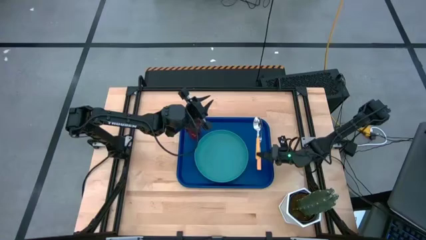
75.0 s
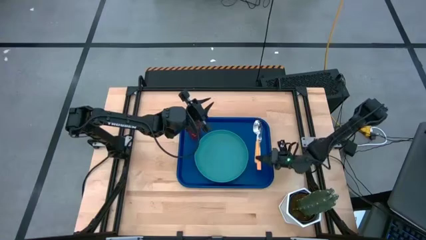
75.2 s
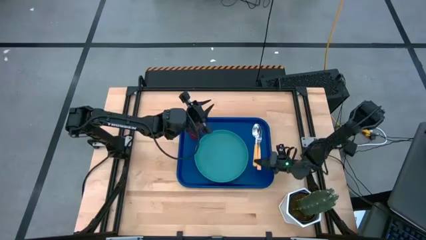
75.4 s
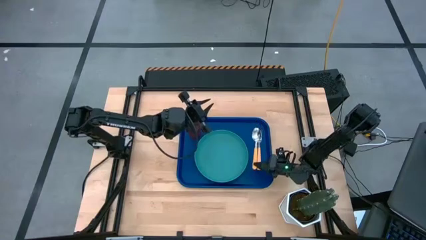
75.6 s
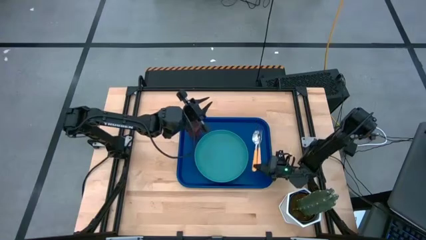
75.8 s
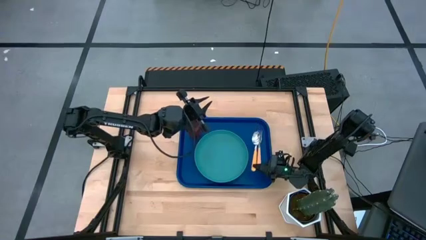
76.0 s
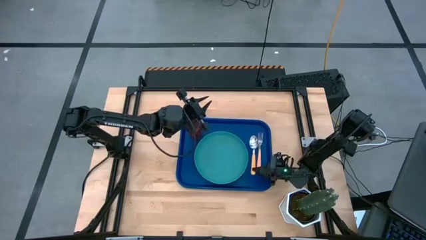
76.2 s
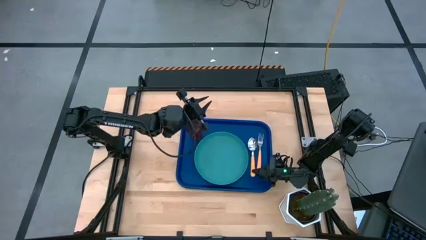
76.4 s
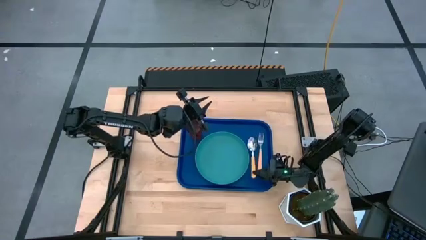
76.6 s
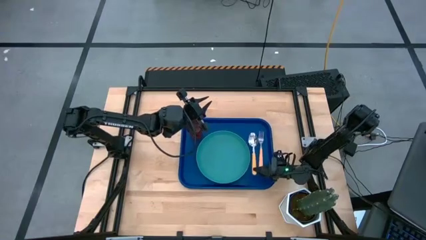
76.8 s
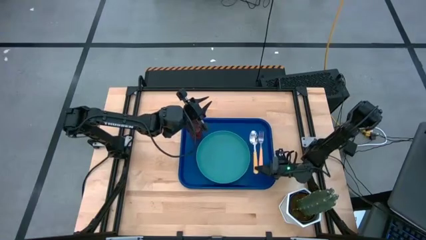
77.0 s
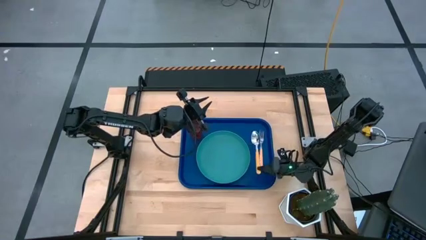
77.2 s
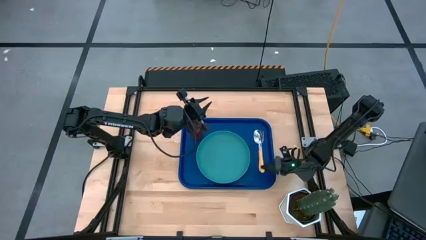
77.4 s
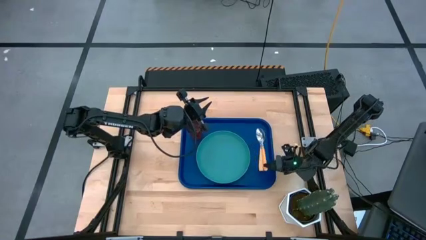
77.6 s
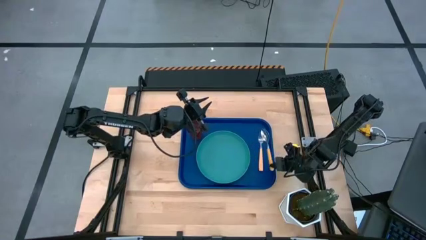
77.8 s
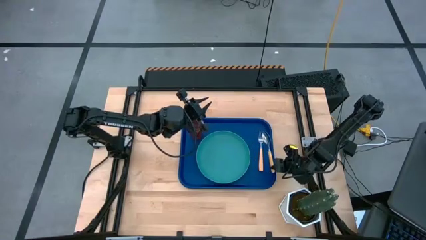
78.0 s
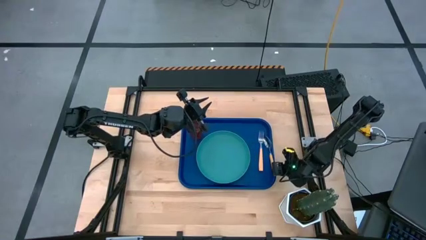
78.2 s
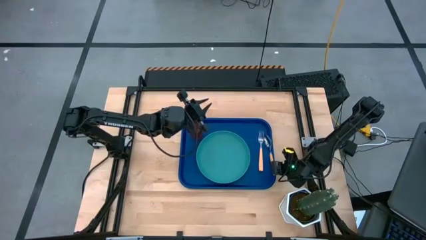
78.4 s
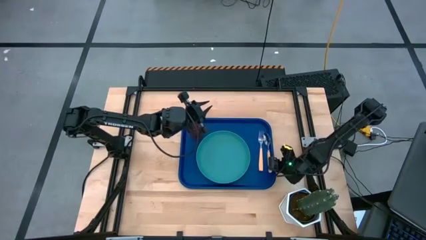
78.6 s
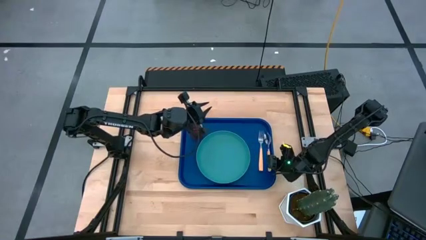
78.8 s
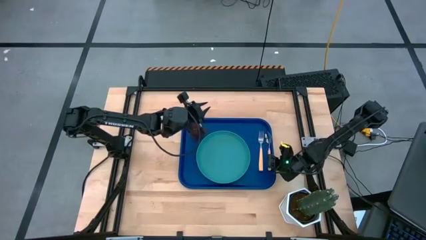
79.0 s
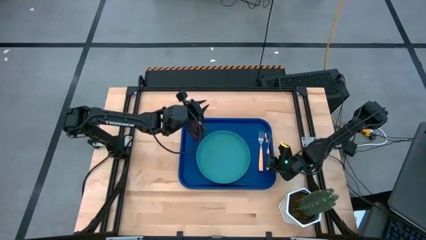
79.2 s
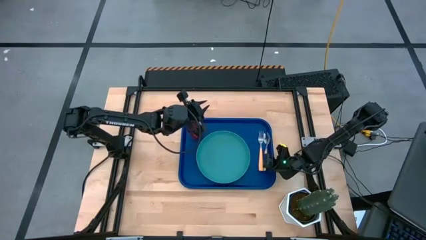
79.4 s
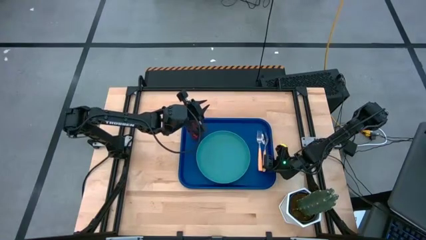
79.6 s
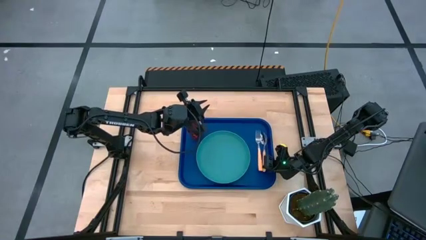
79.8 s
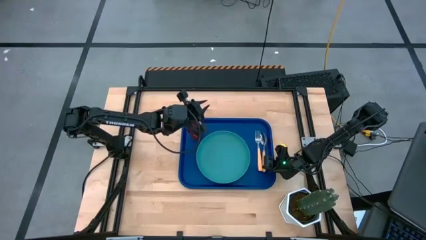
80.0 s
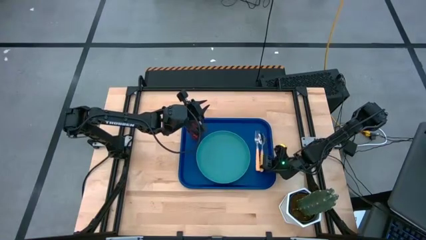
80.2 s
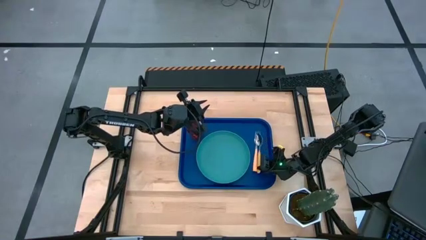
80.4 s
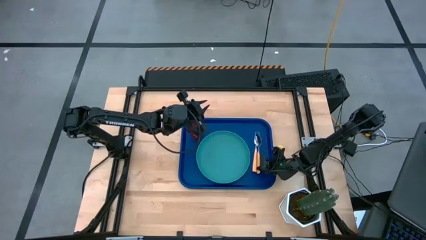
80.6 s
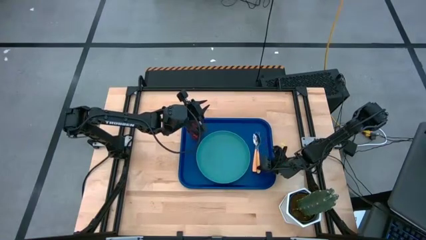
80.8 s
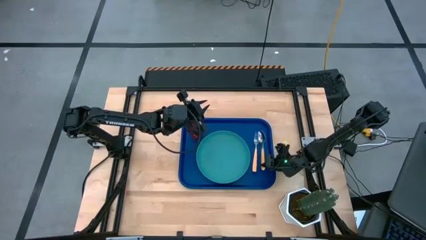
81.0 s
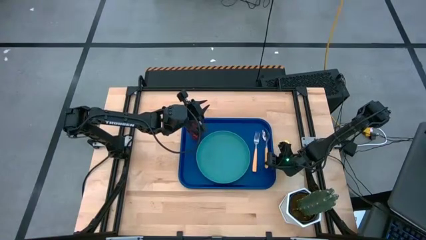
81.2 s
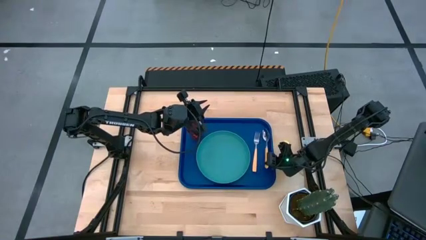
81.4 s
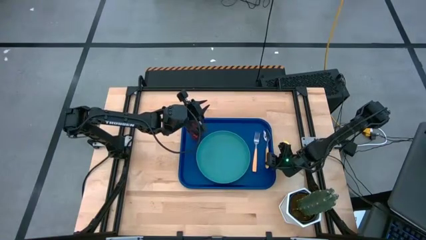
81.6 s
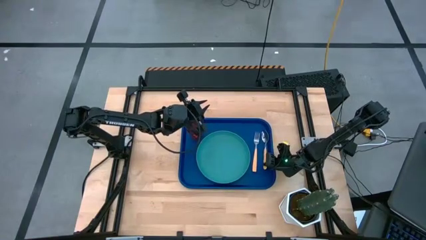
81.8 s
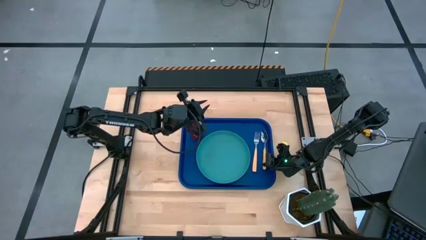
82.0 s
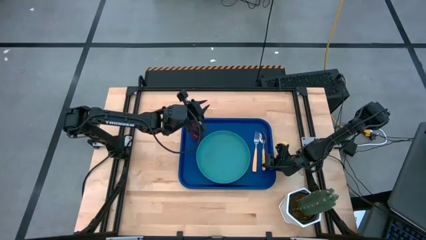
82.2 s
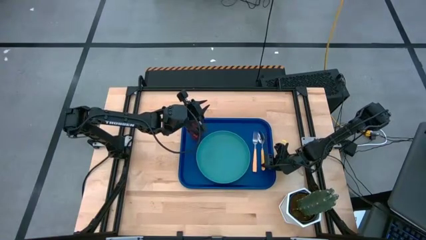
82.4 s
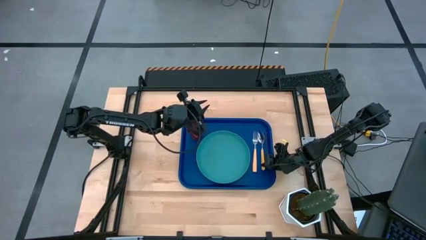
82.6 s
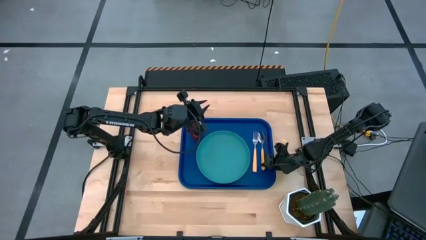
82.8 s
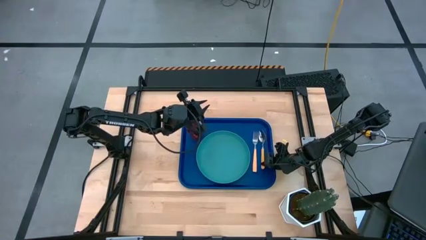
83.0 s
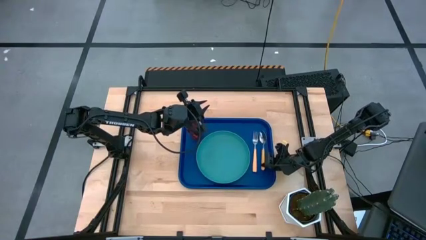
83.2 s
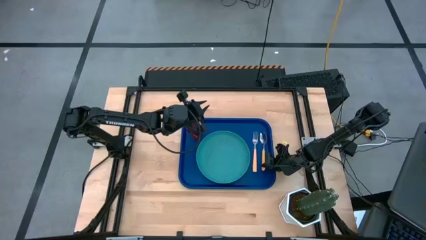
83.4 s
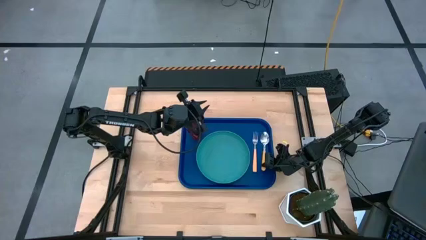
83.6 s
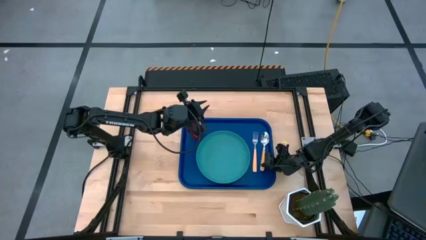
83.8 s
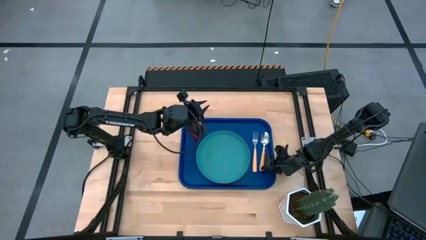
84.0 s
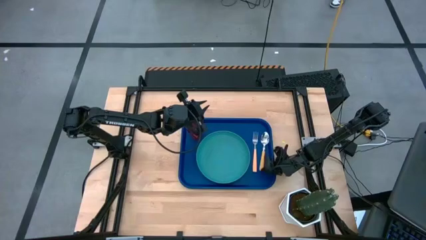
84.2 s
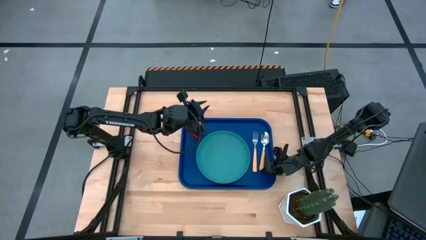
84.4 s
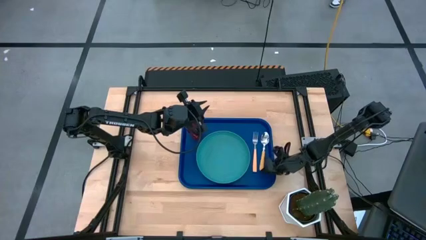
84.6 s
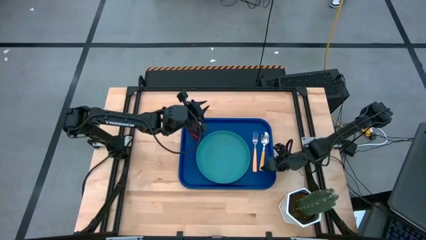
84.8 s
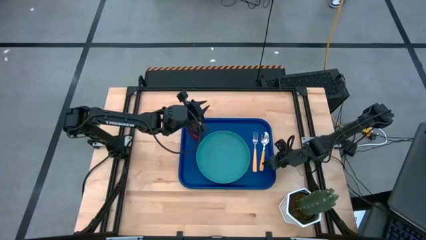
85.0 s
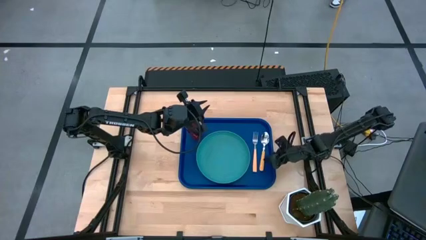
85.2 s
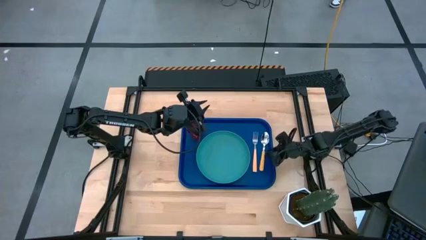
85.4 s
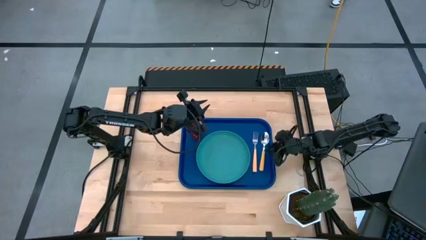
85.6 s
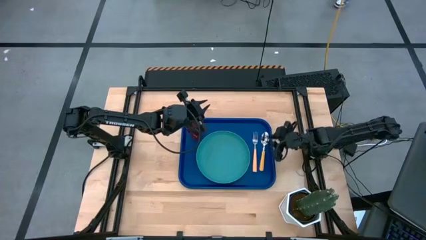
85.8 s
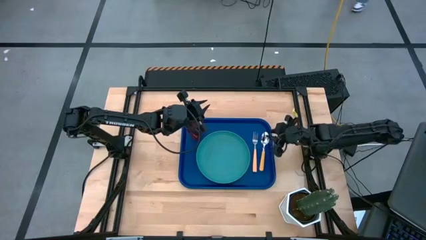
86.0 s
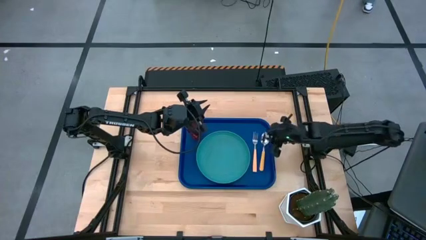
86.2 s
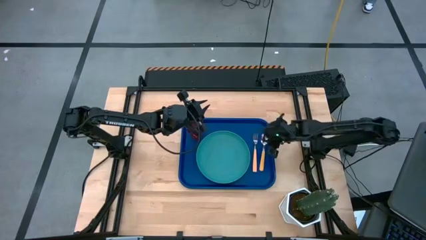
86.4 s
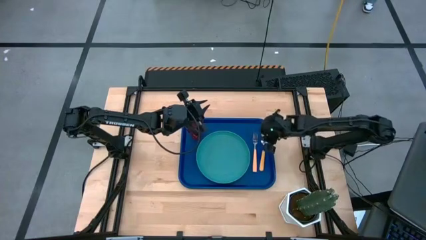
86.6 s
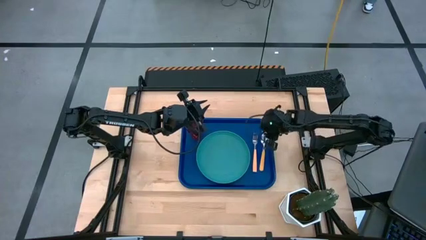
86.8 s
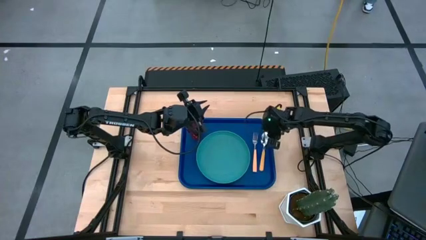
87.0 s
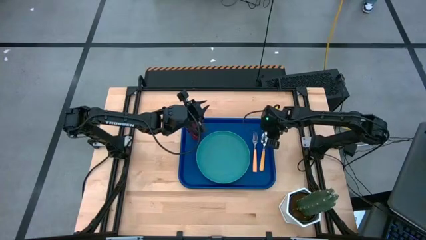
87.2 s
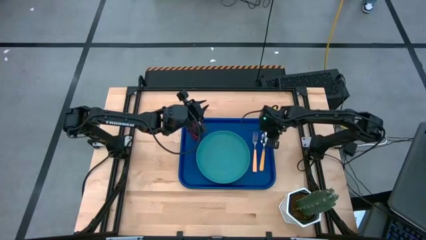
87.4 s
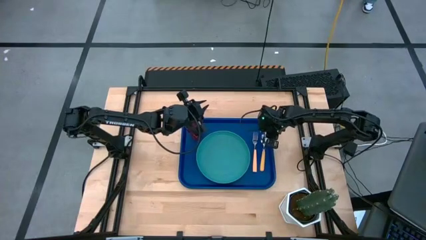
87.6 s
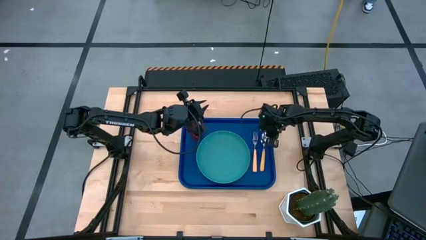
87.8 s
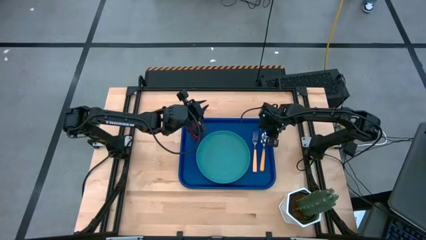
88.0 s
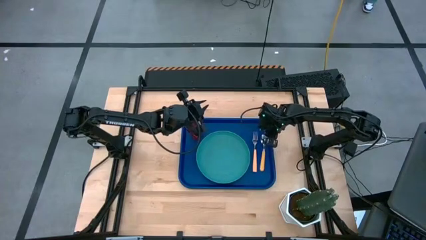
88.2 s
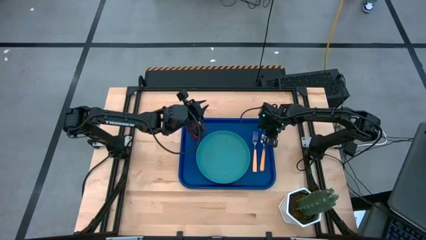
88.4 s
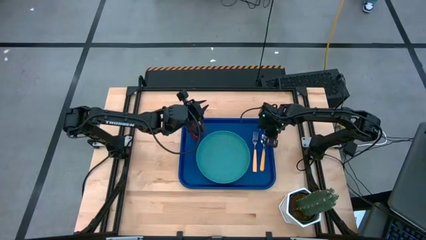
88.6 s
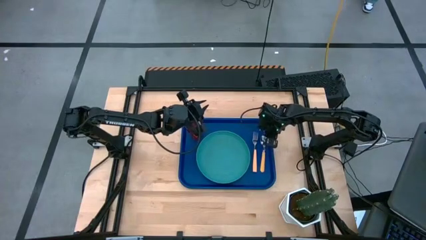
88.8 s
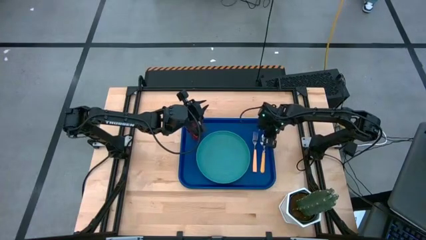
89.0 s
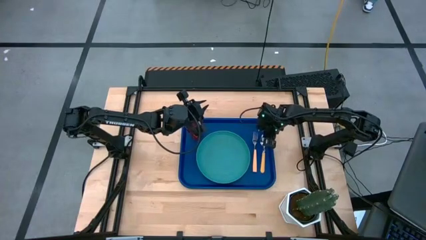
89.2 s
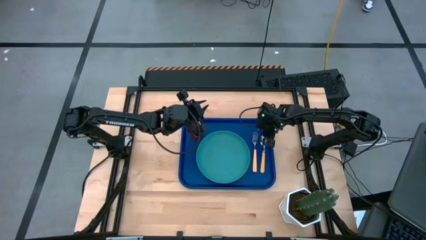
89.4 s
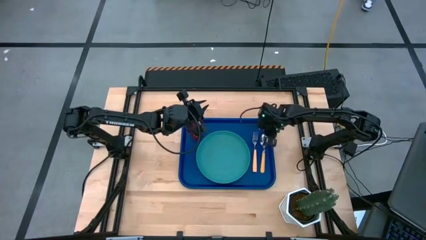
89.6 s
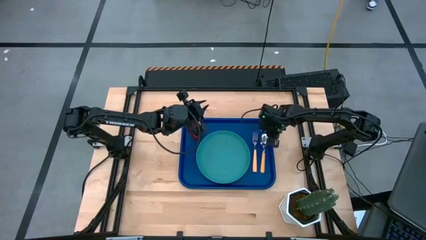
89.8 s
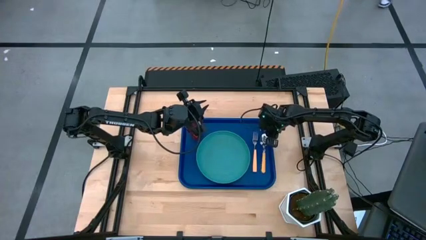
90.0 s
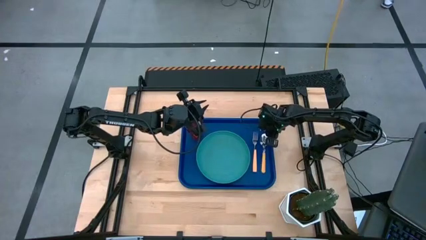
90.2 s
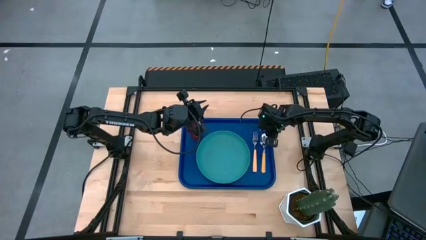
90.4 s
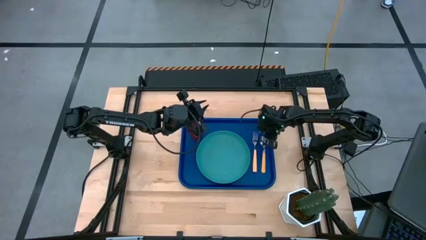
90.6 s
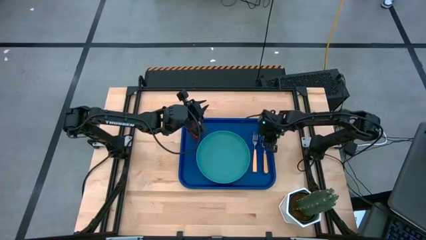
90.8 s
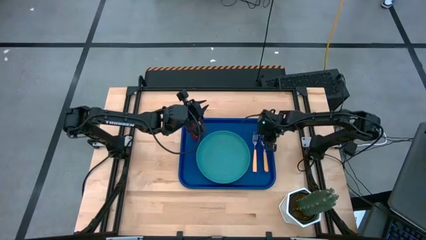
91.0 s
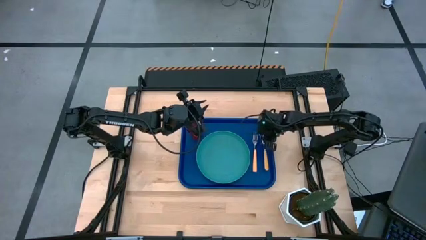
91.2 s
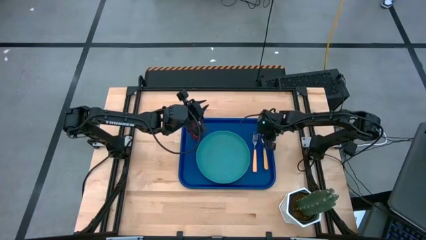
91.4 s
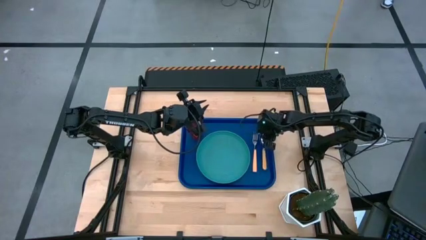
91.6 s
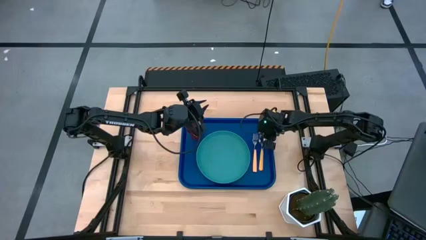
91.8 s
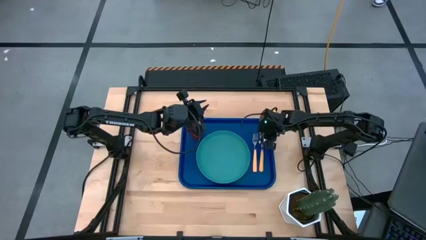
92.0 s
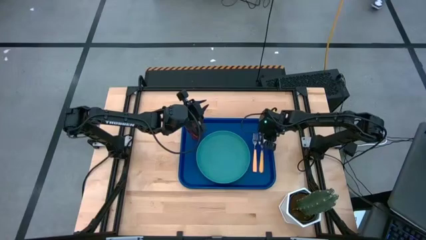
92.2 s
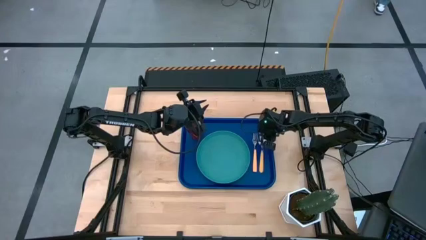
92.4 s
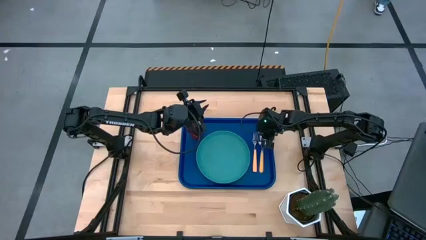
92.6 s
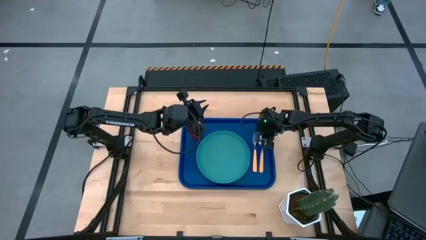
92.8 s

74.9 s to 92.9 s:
Task: Pick and place plate/cup/fork/spoon on tray
Put the orange spoon on the blue tray to the right of the yellow fork

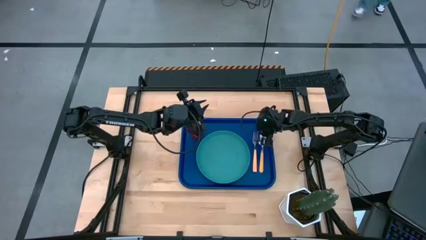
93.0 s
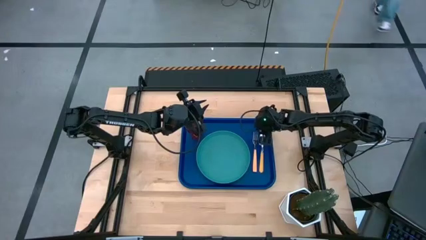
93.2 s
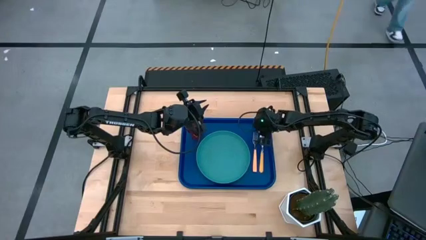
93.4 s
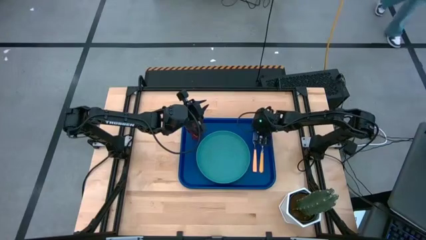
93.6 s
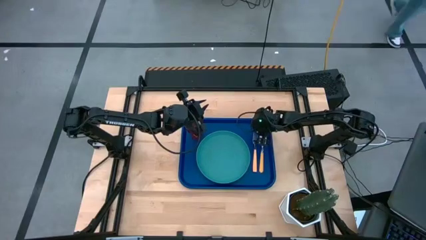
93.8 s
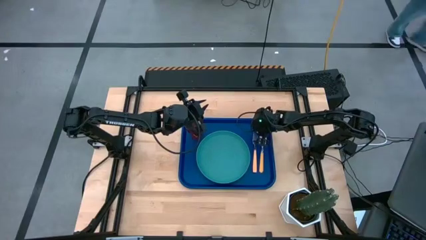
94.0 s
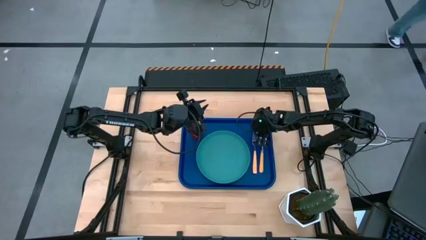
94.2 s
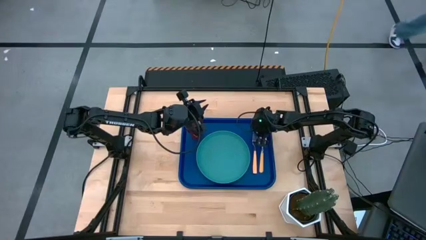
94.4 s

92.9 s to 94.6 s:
Adjust the yellow fork on the blue tray
